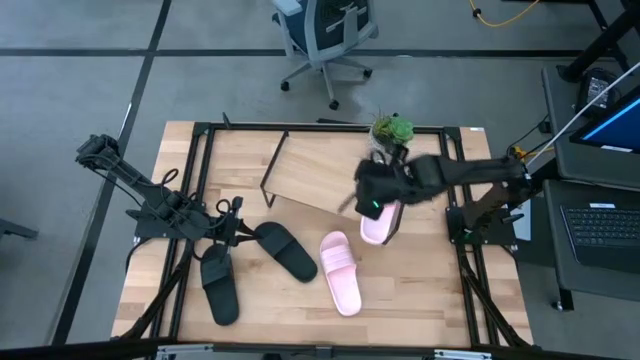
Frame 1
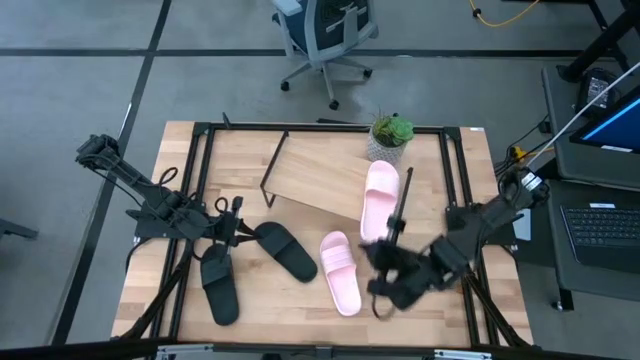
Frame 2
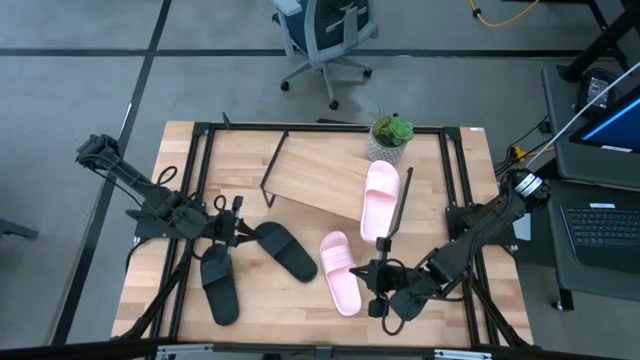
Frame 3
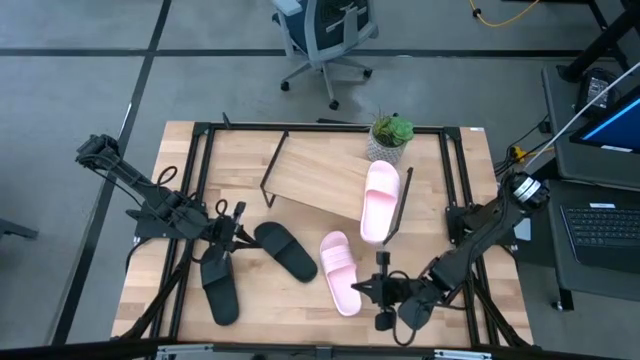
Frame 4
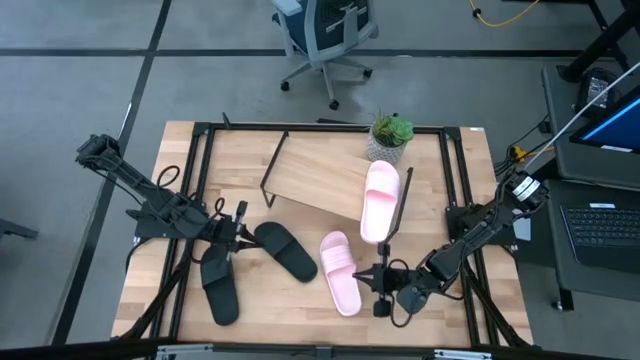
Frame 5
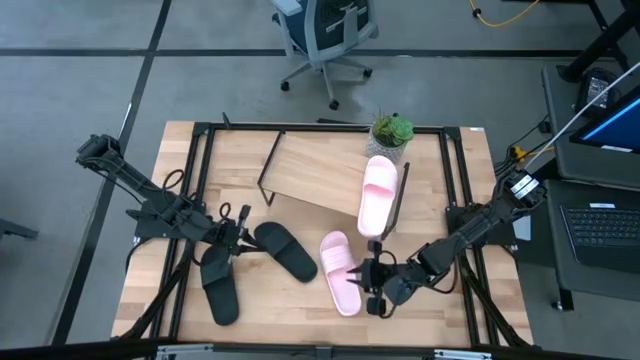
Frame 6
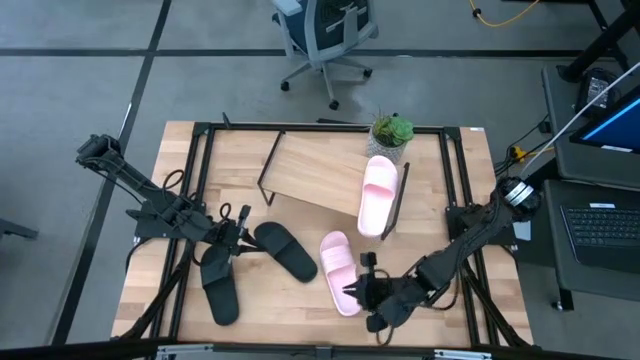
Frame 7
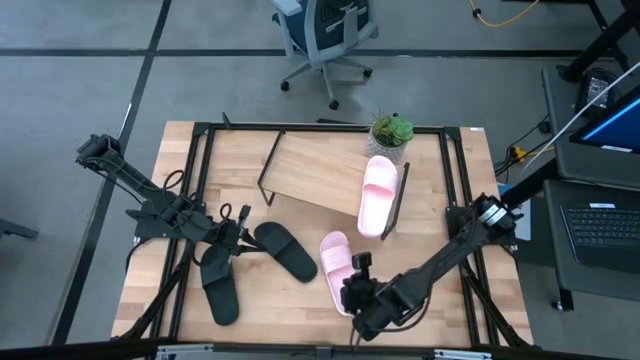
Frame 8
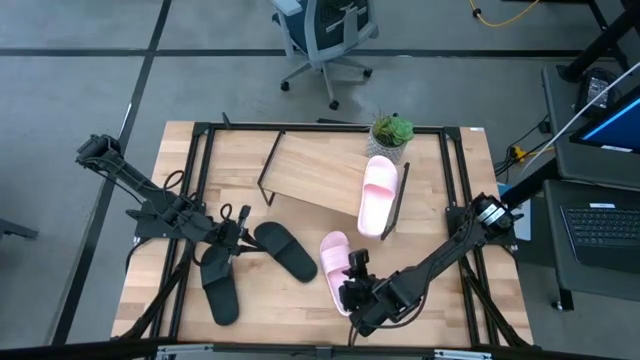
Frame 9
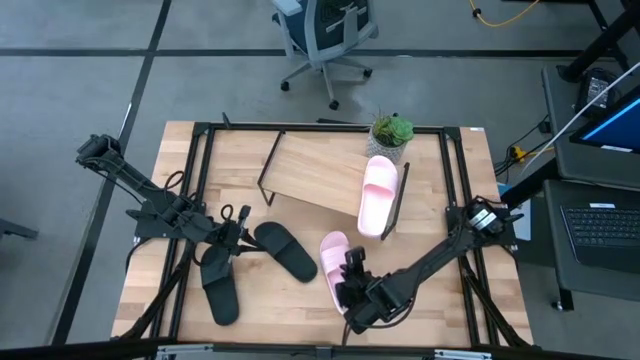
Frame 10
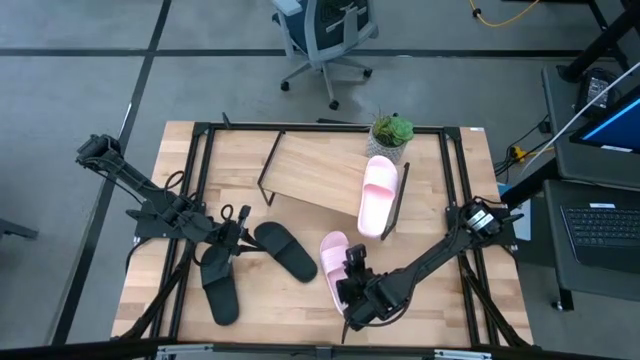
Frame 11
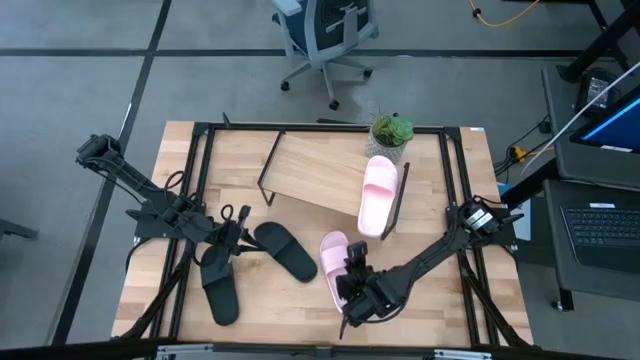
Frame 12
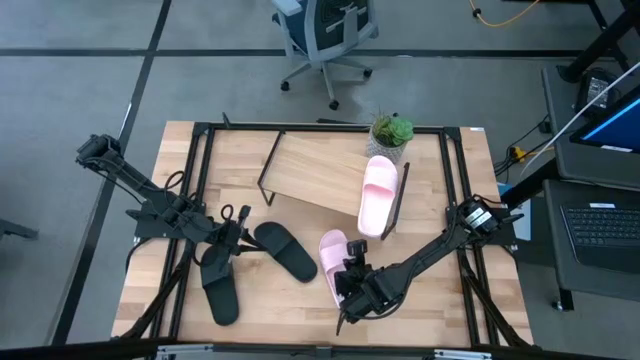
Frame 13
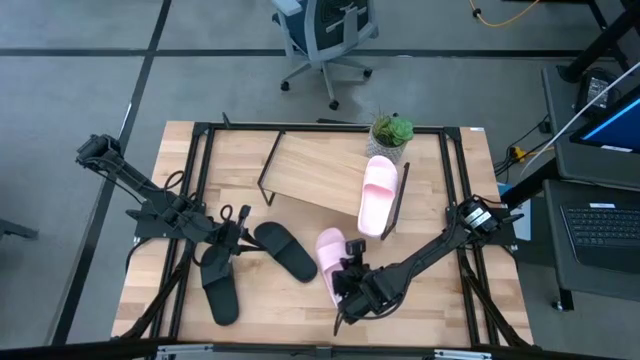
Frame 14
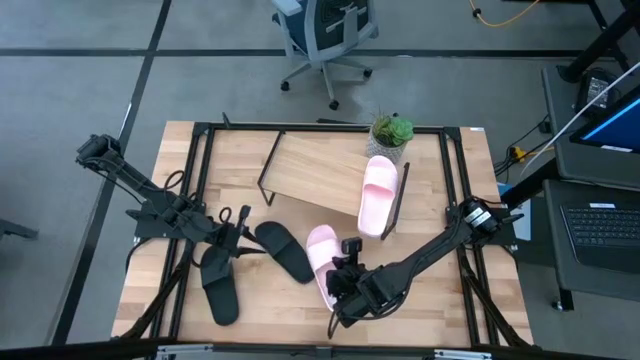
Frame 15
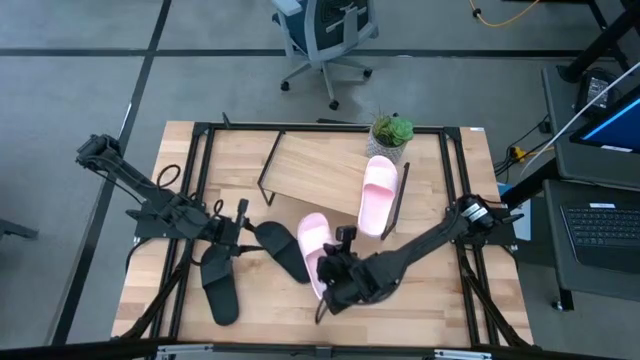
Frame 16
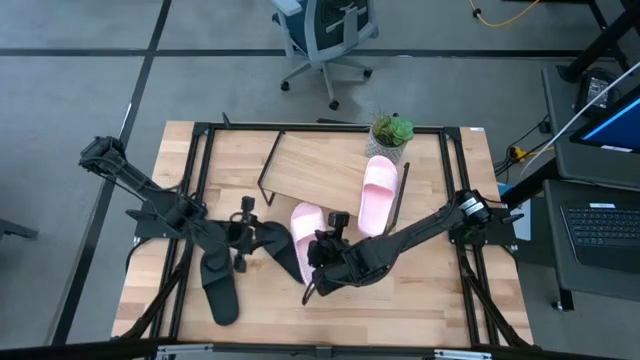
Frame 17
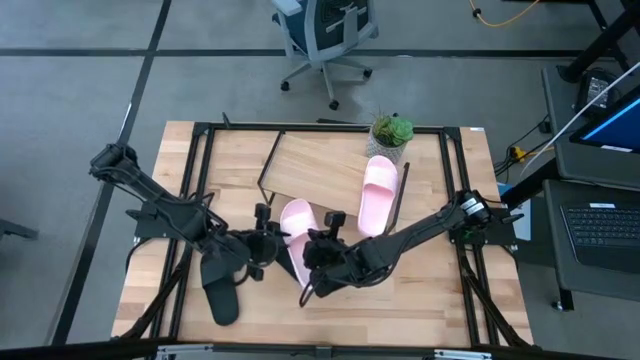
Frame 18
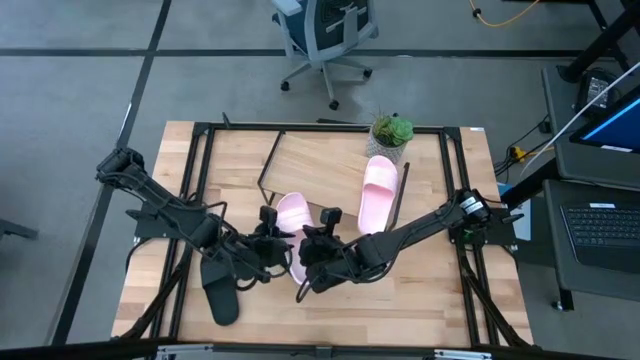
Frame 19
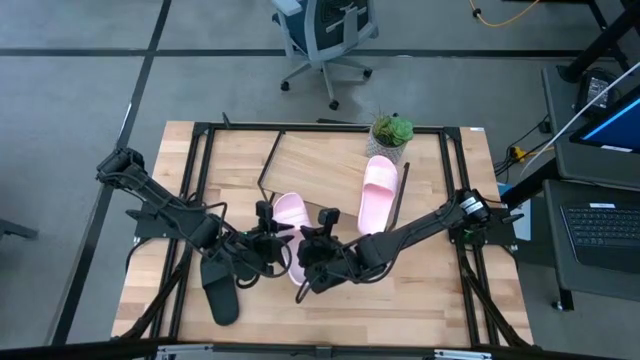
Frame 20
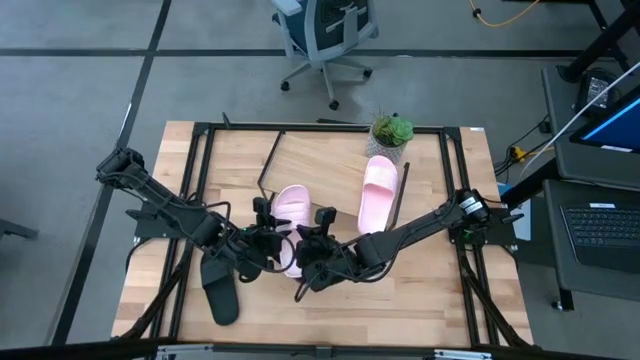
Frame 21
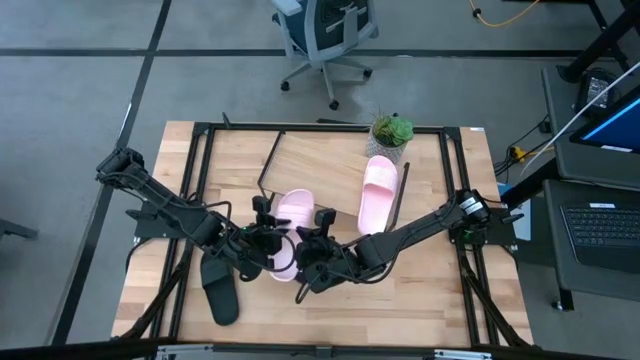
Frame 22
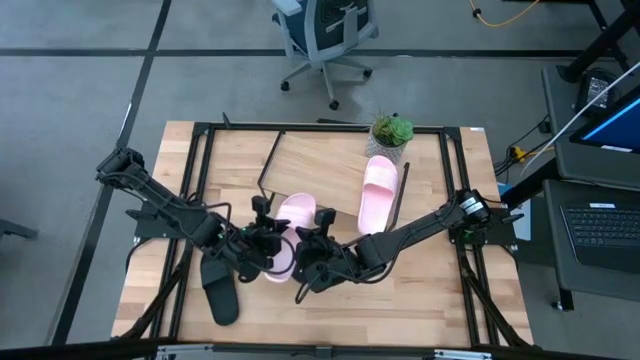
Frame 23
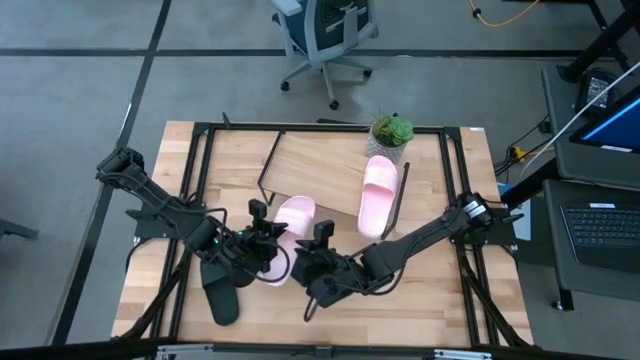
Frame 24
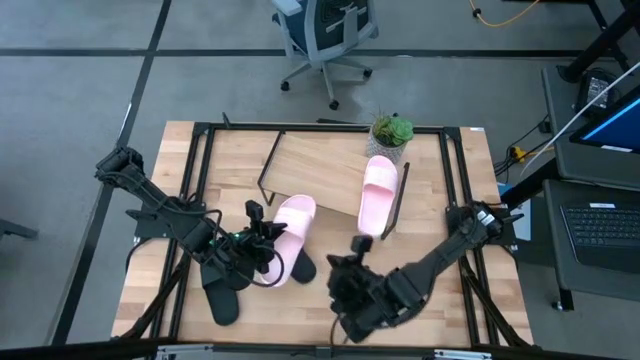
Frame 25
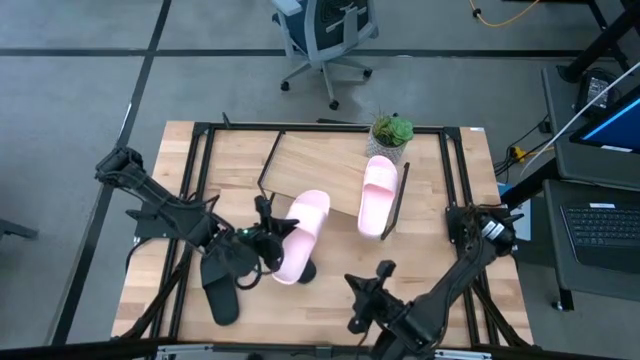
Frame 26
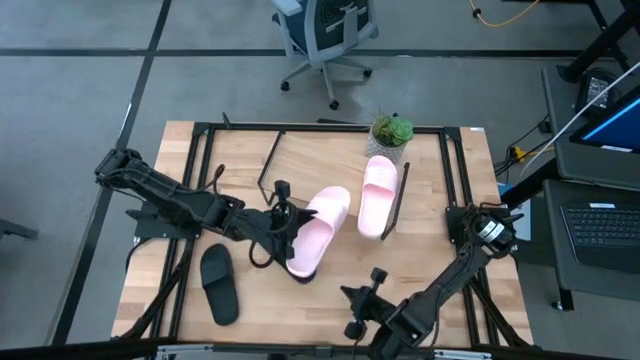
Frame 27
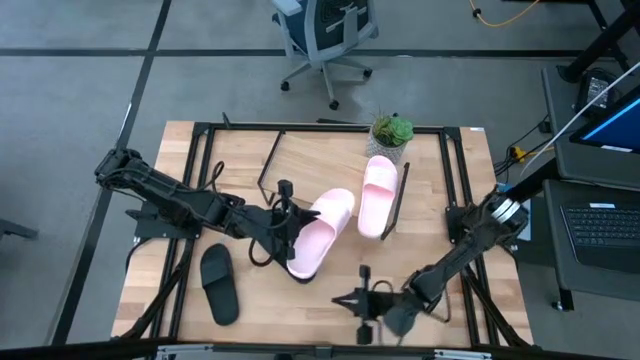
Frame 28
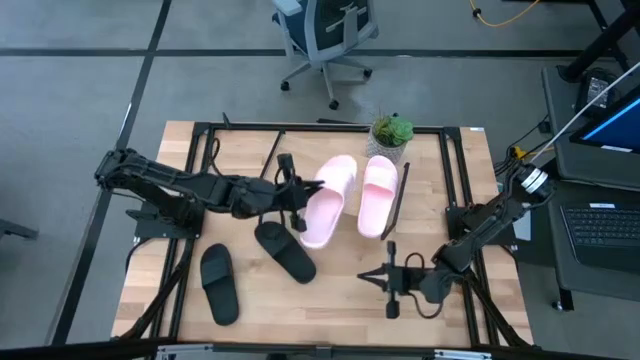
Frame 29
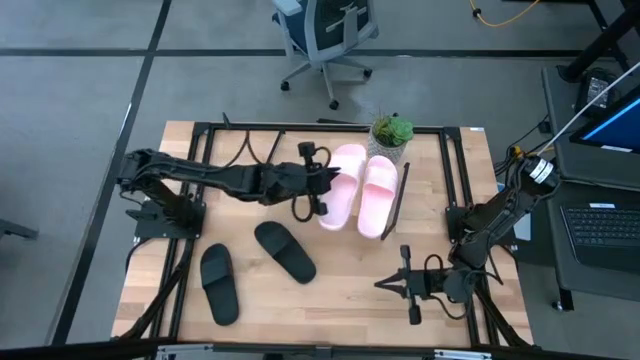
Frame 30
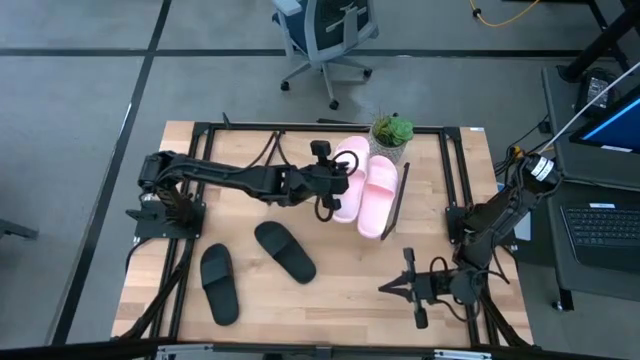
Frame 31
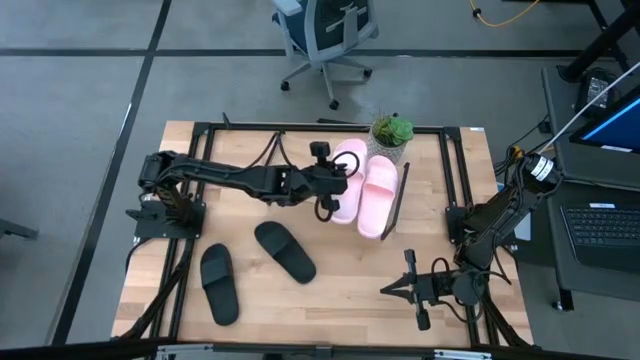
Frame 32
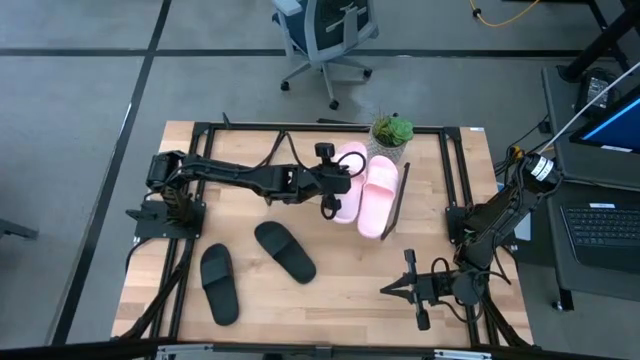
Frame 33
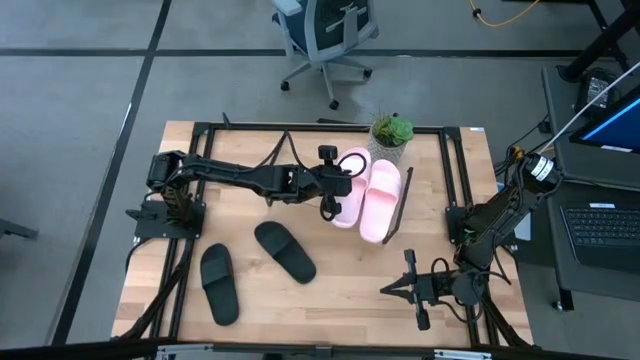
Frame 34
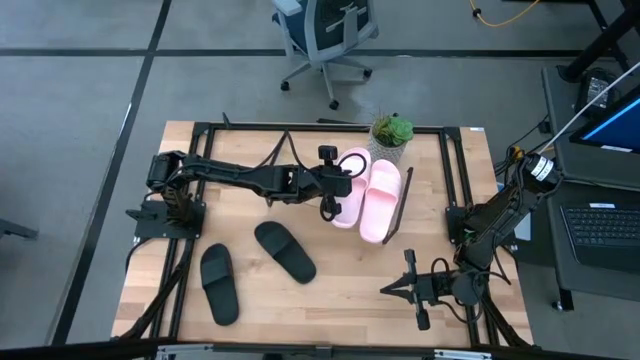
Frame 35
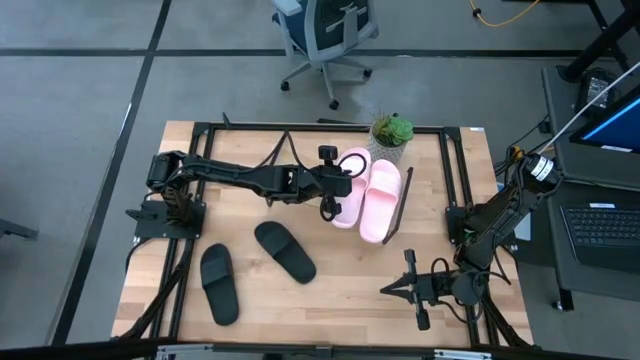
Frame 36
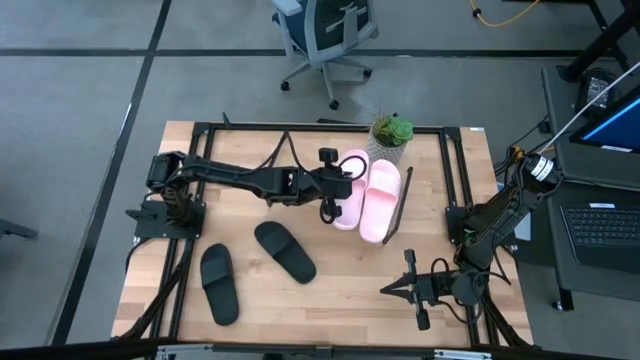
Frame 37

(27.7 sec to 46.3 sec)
Task: Pick and place slides into the shelf
Put the pink slide on the shelf

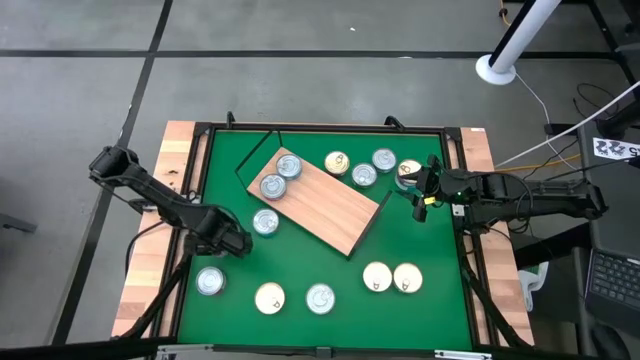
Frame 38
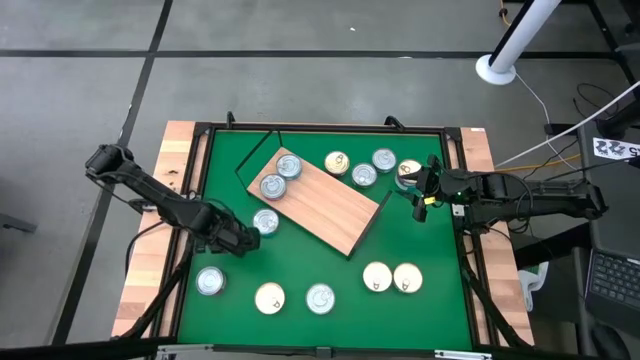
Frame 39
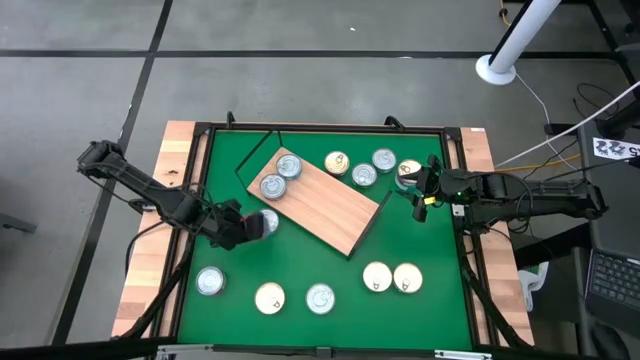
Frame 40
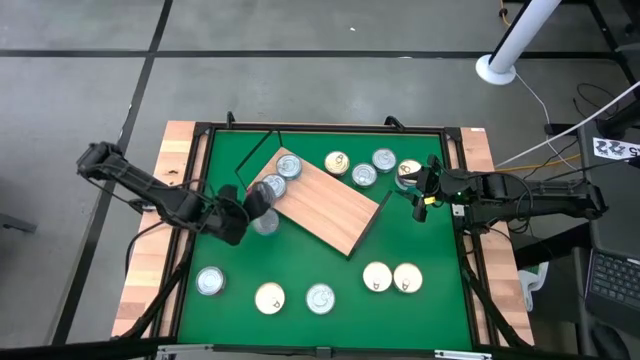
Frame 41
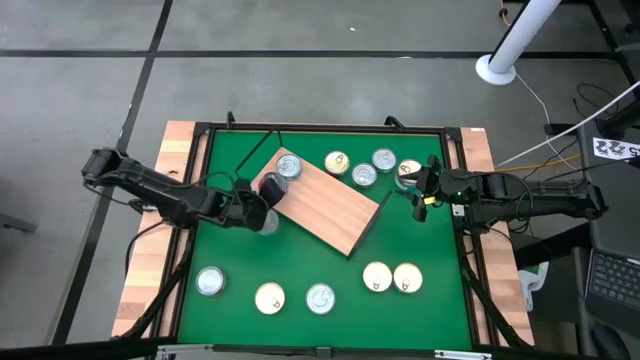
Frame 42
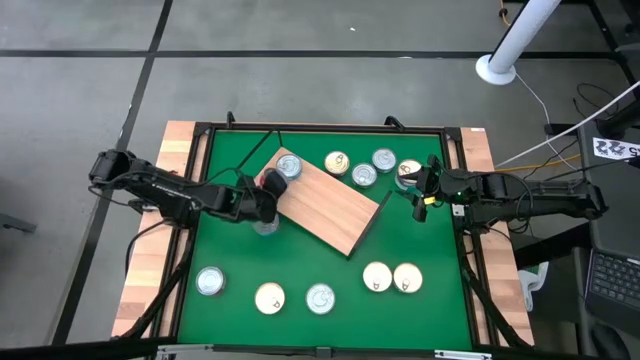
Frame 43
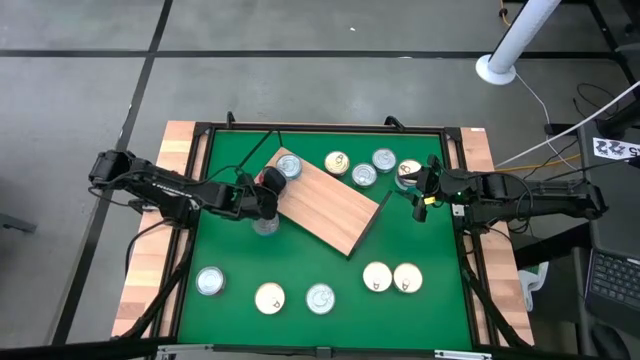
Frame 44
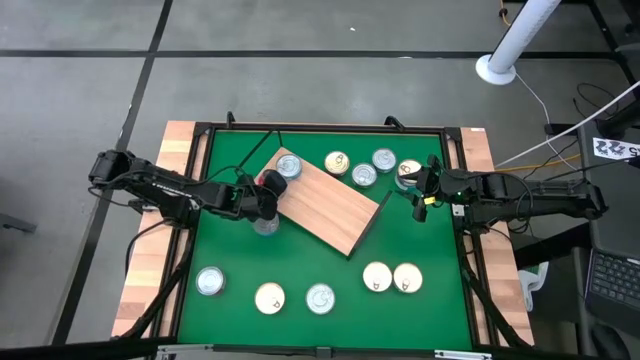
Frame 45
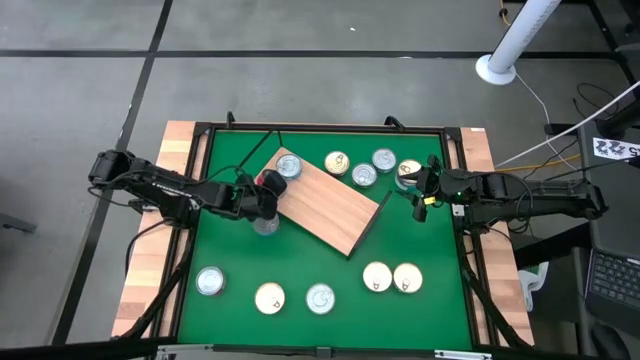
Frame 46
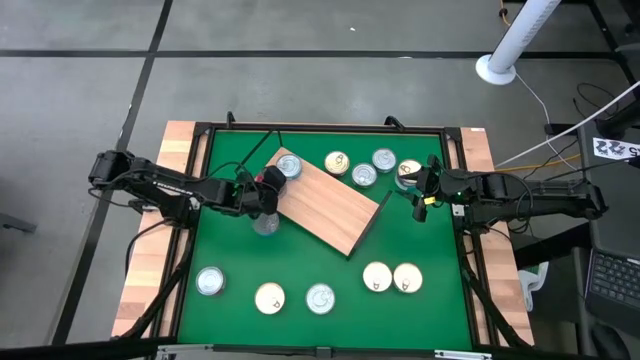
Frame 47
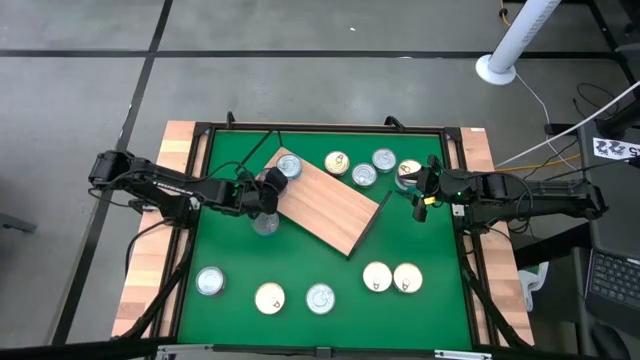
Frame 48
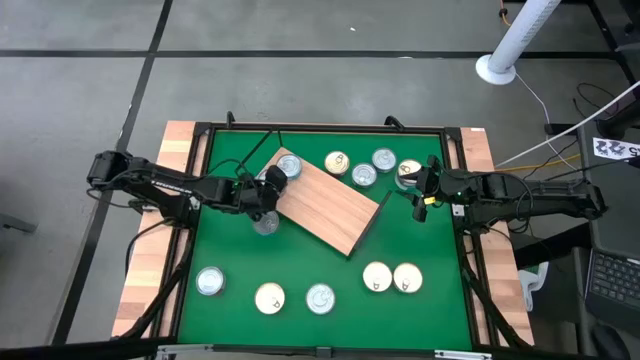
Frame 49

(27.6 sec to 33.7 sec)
Task: Stack canned seafood by type on shelf
Stack the red tuna can on top of the red tuna can on the shelf
